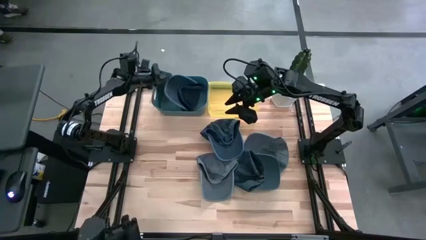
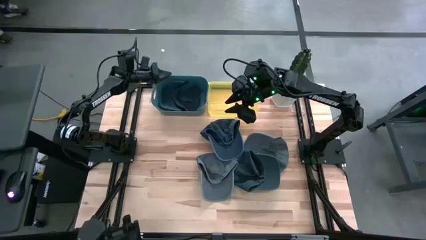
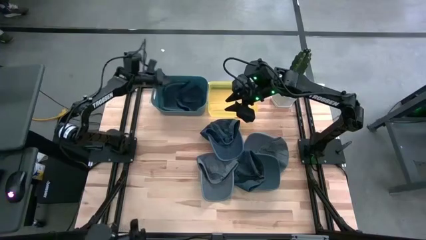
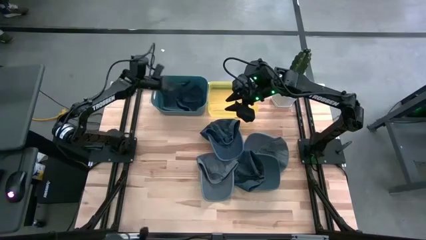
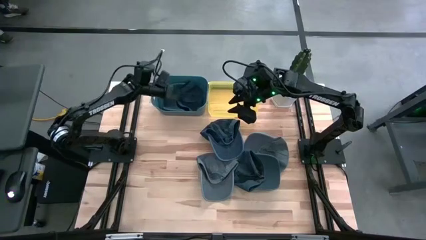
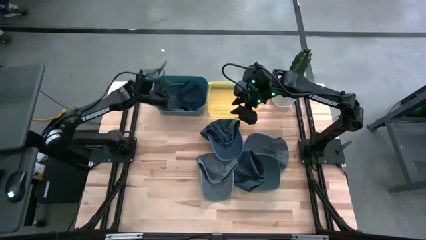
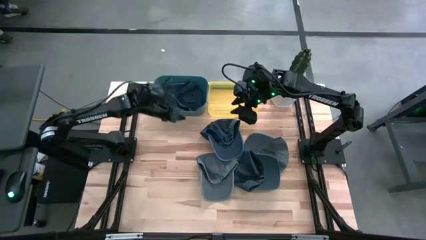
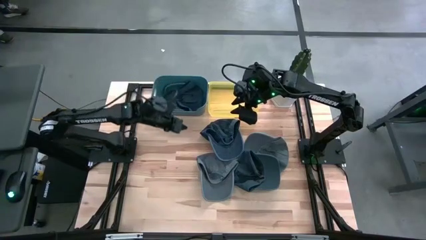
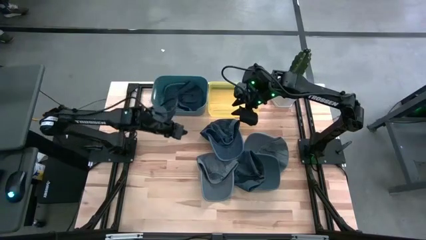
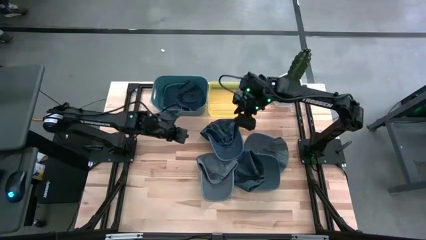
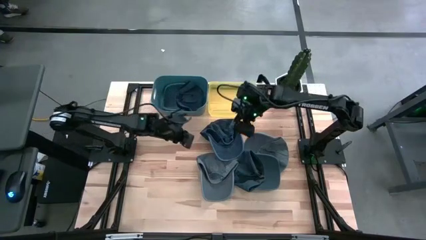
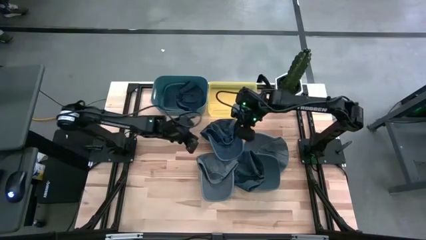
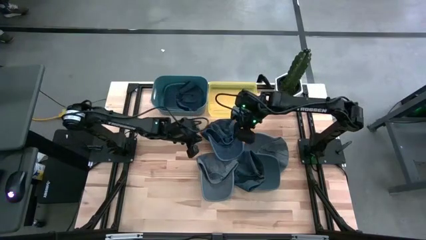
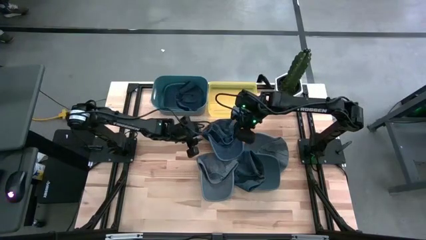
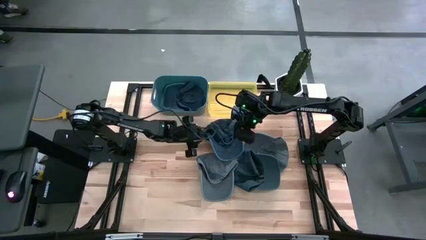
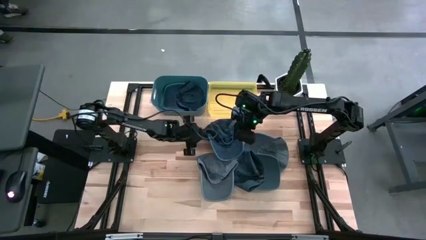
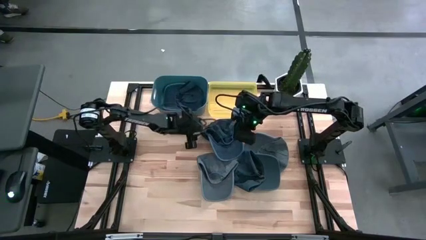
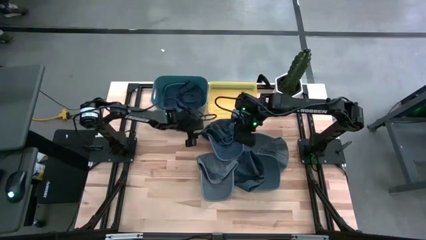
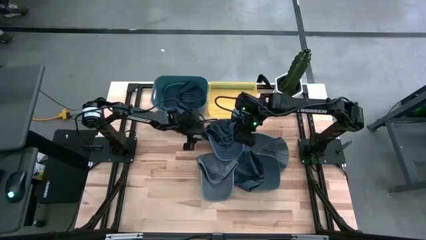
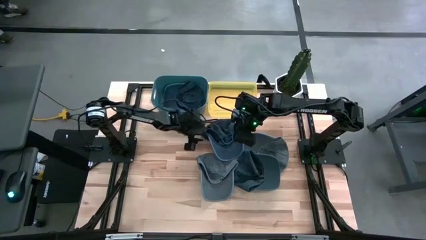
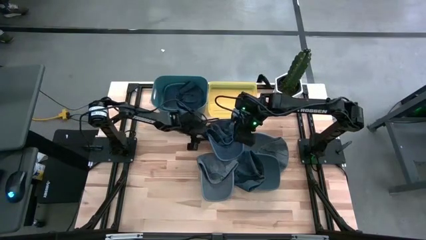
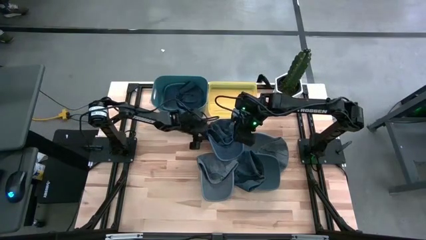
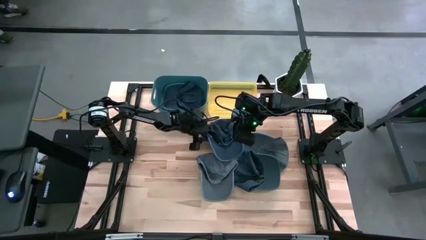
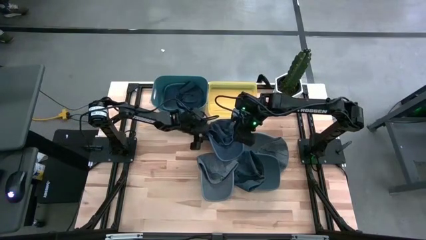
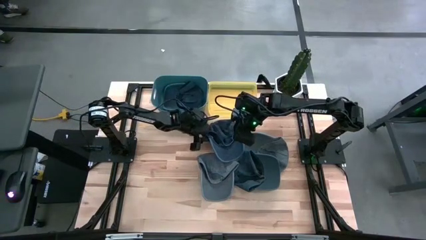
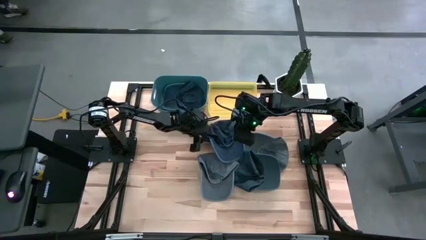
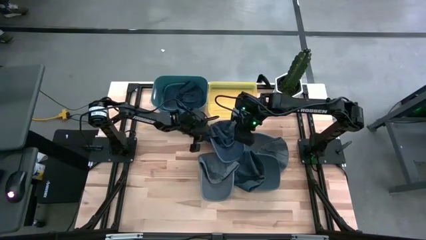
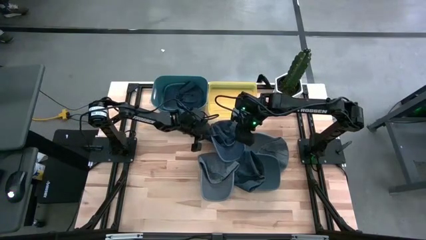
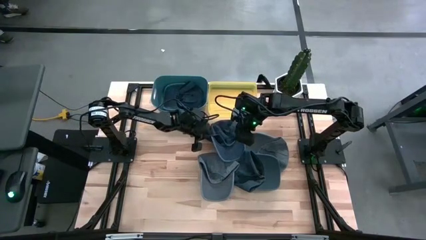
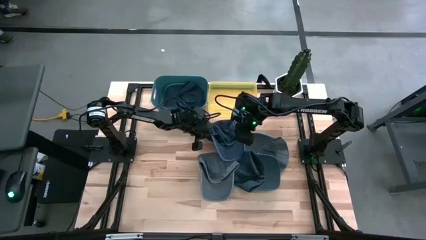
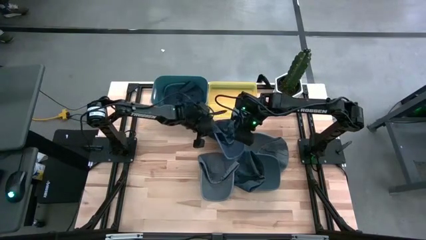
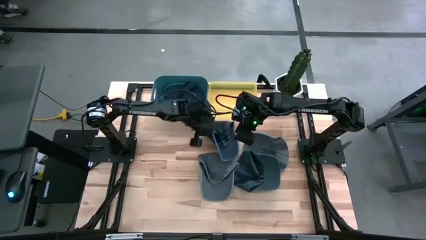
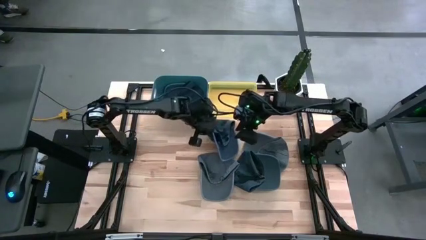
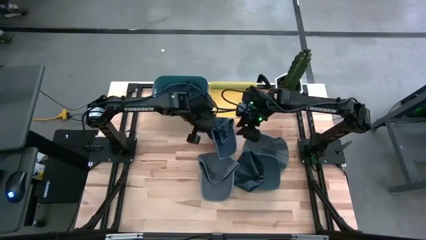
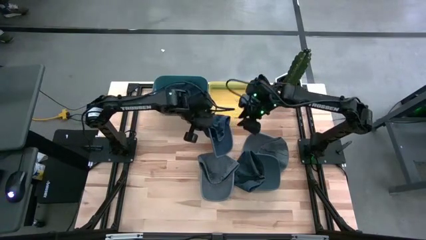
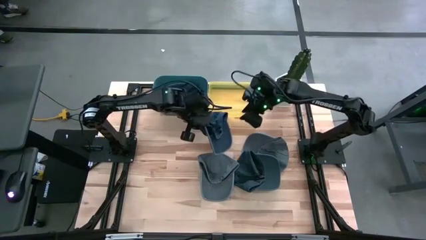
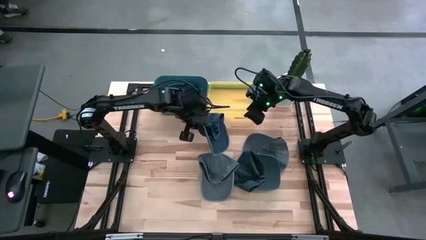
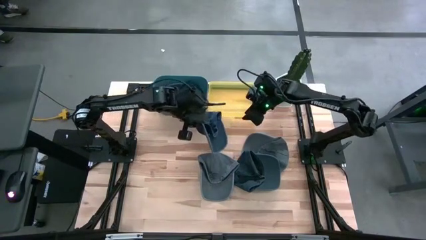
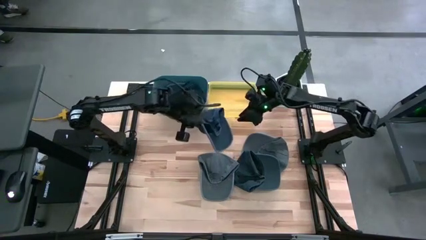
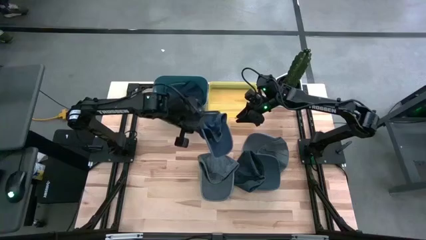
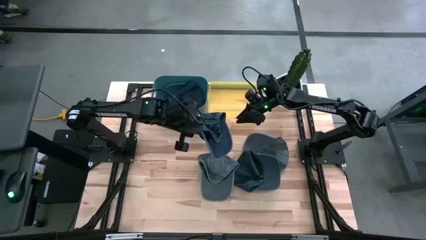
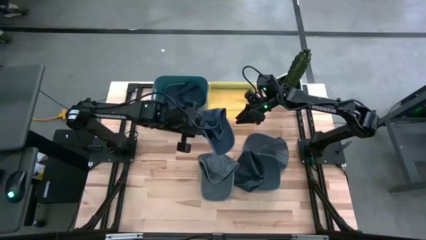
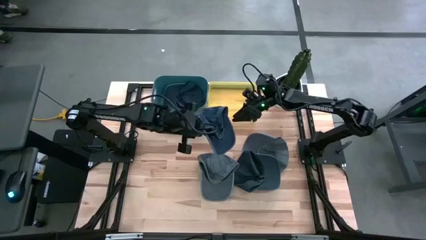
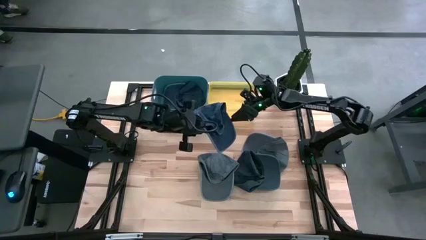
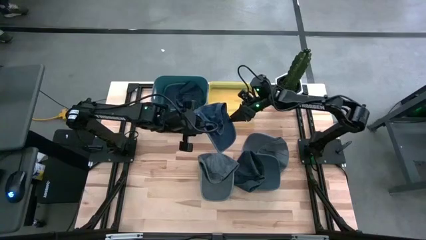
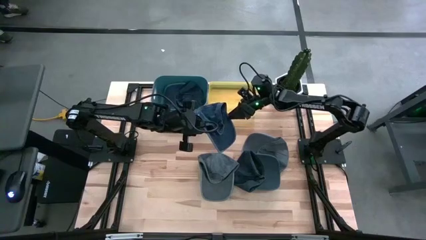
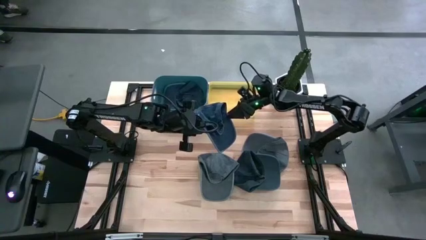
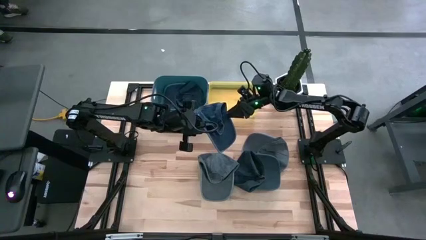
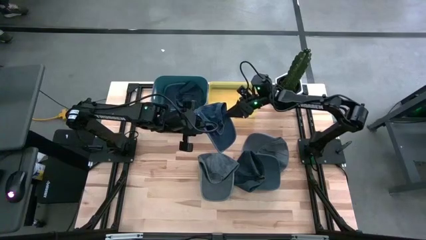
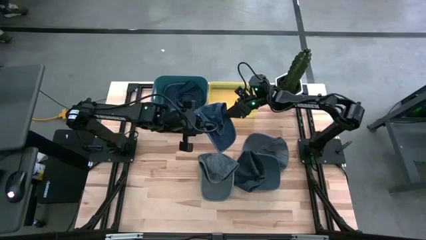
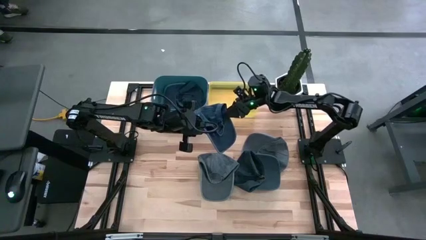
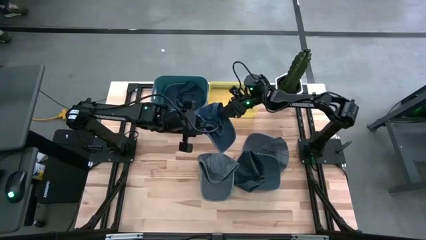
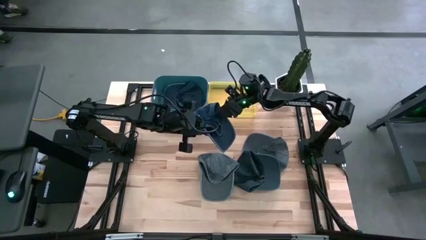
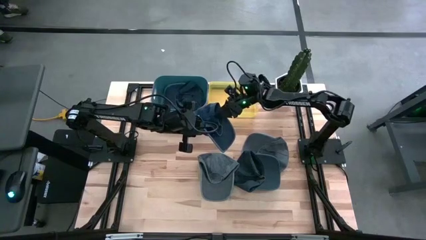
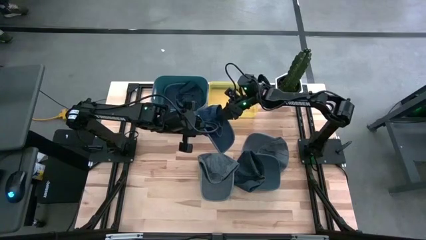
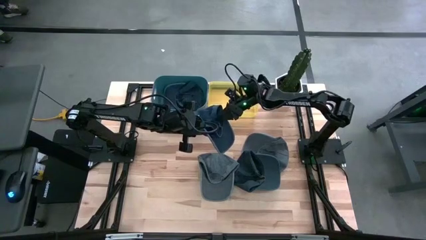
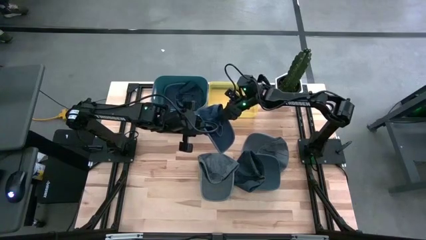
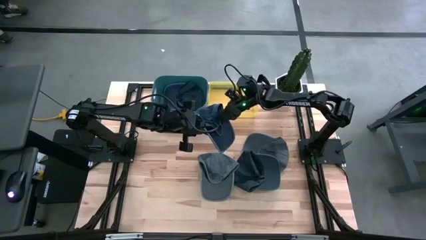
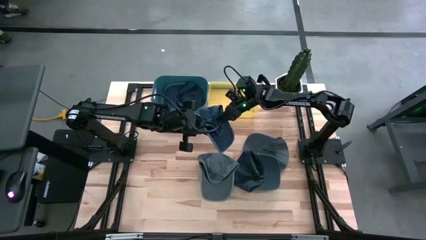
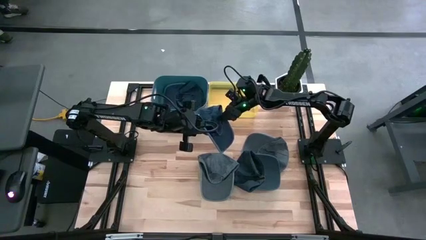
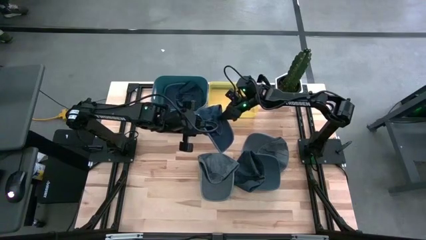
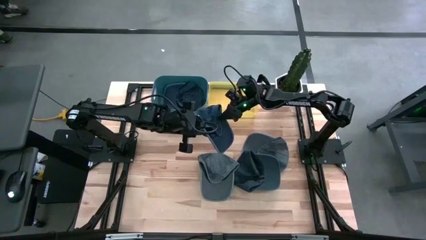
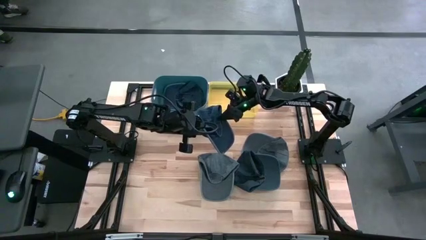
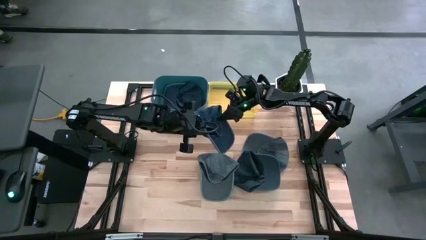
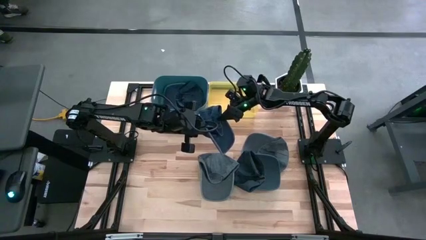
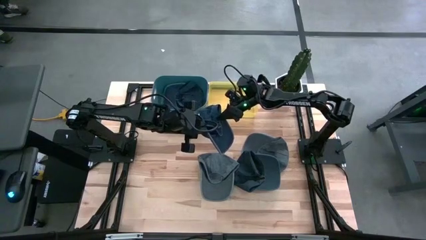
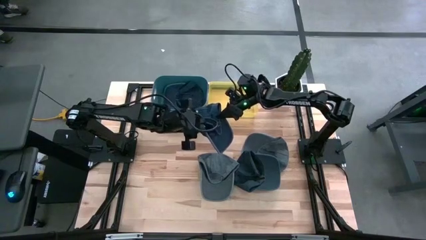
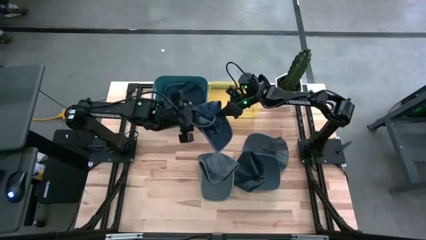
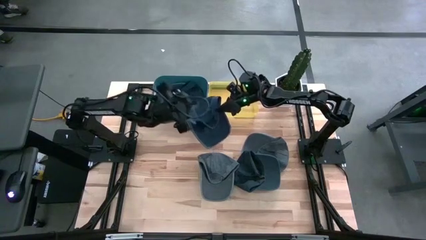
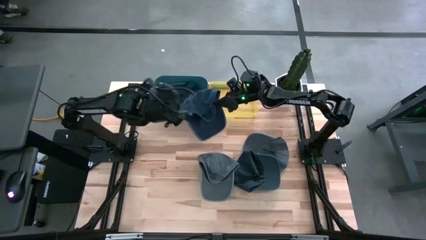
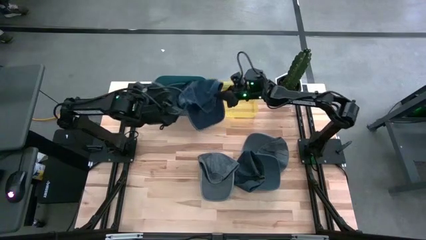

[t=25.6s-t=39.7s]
Task: Pick & Place hat
Put the top blue cap into the blue bin

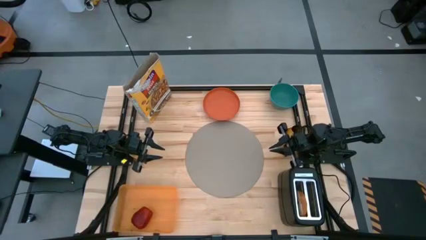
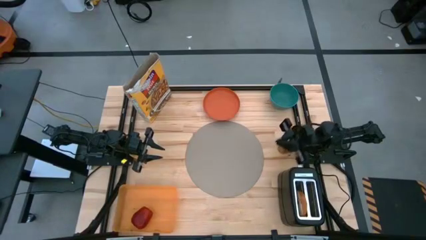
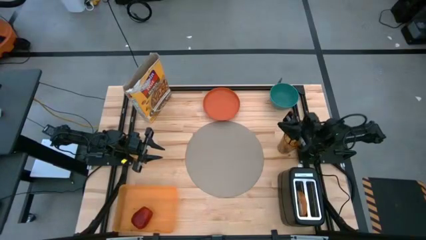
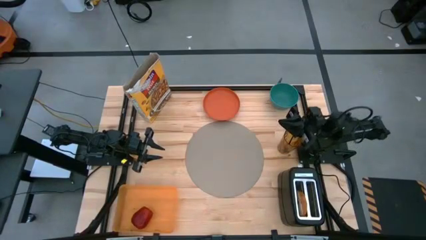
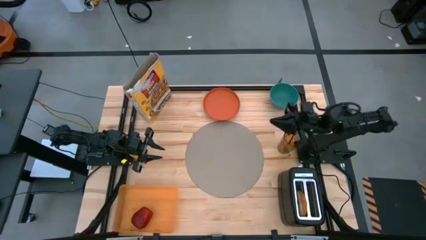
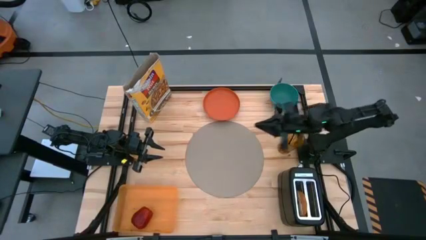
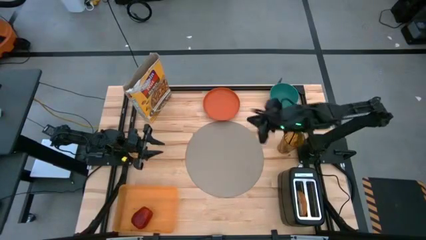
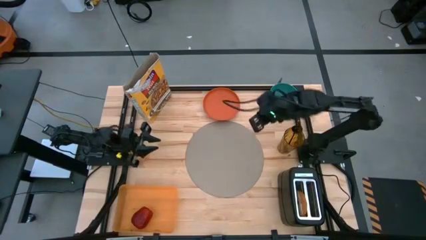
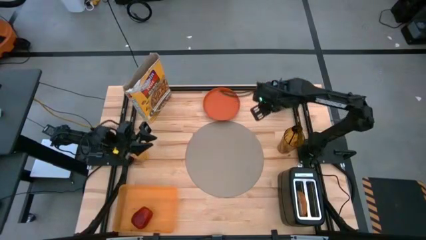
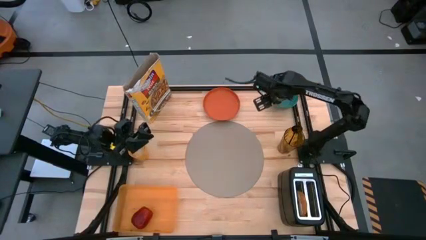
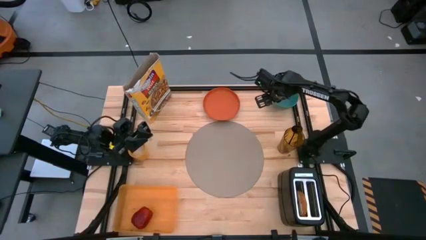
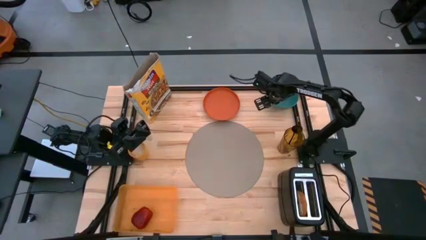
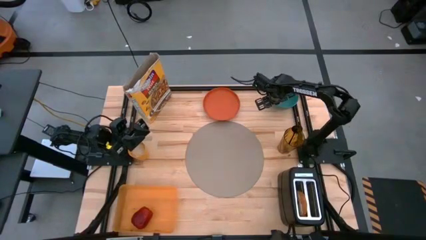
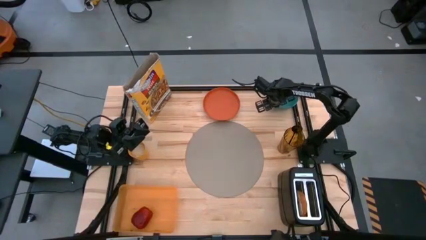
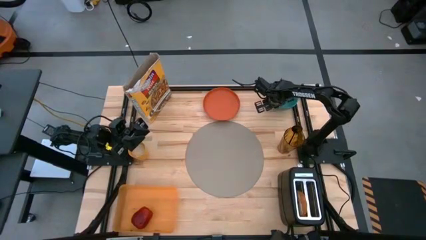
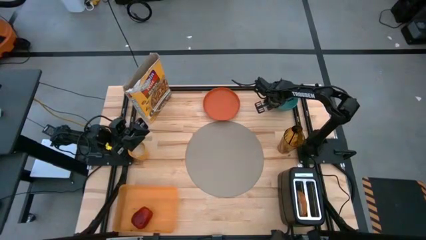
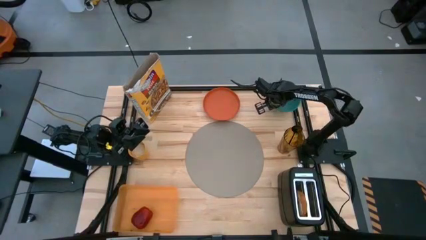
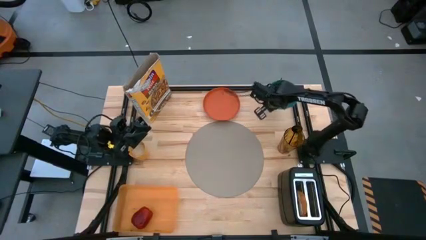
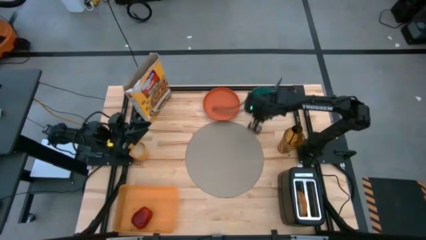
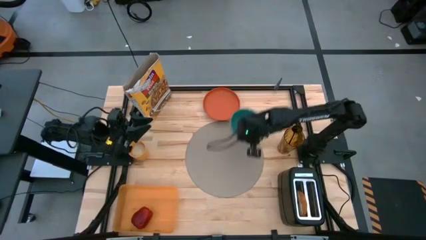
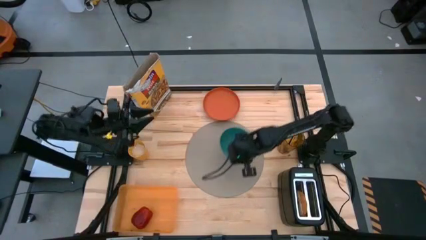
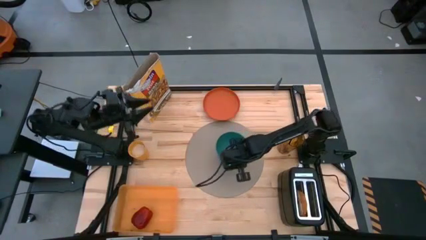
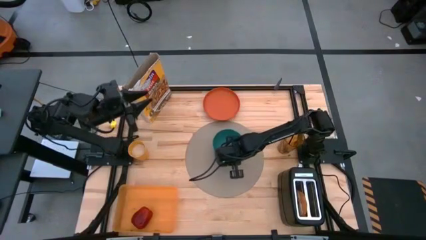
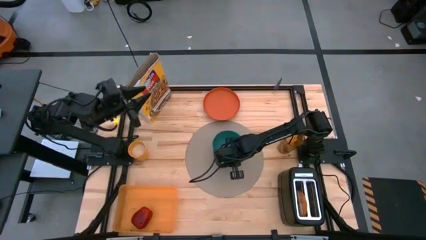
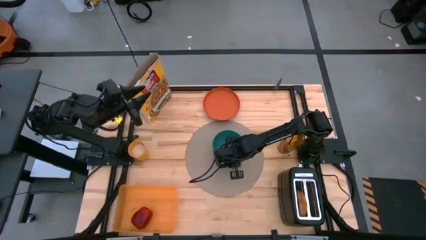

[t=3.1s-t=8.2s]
Task: Arrange a breakfast setting
Put the green bowl on the gray mat
